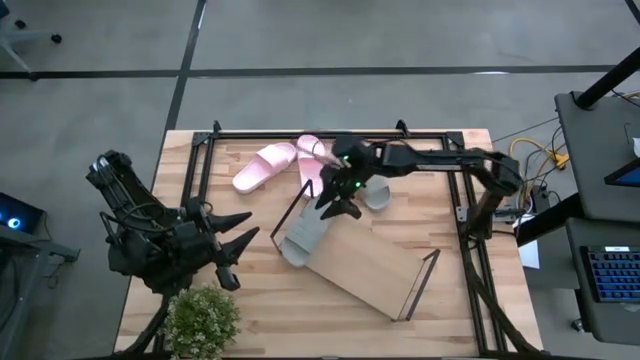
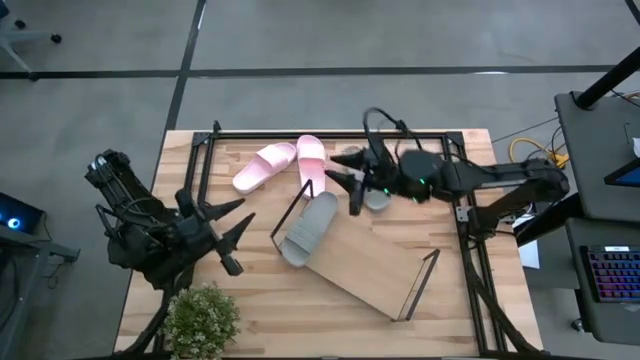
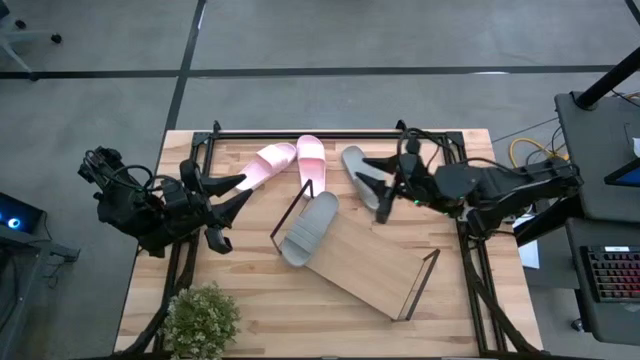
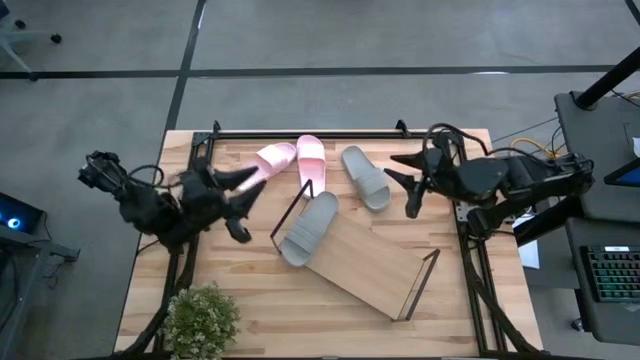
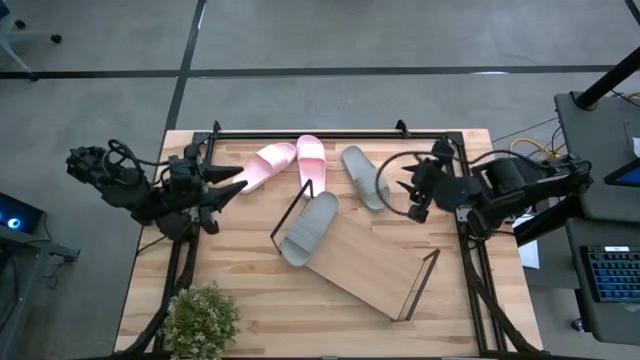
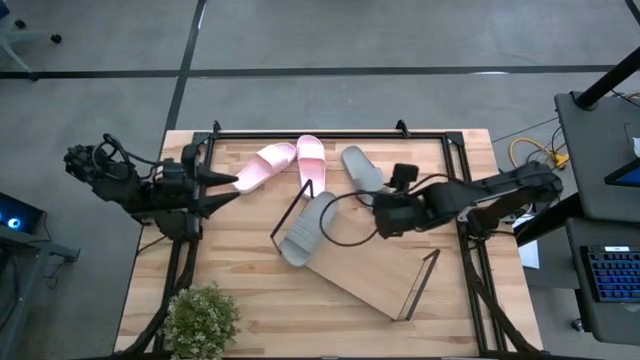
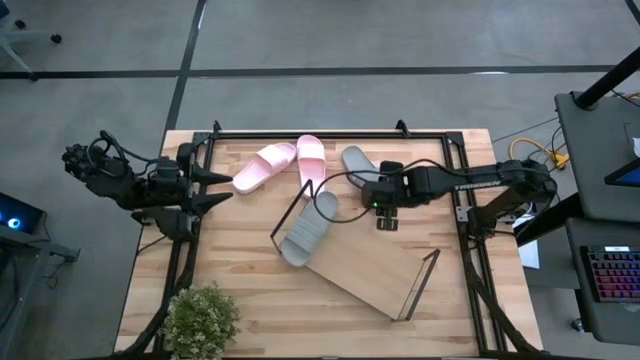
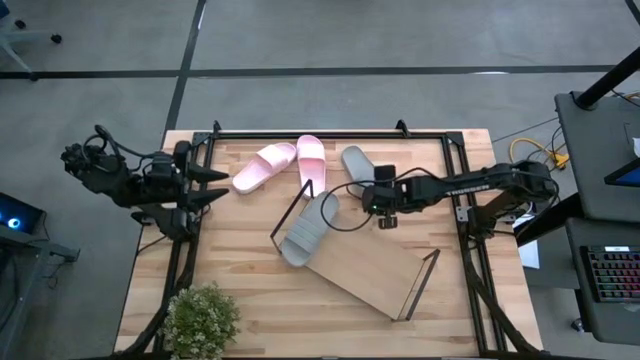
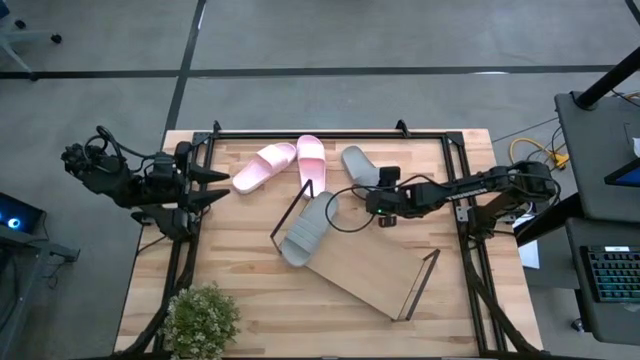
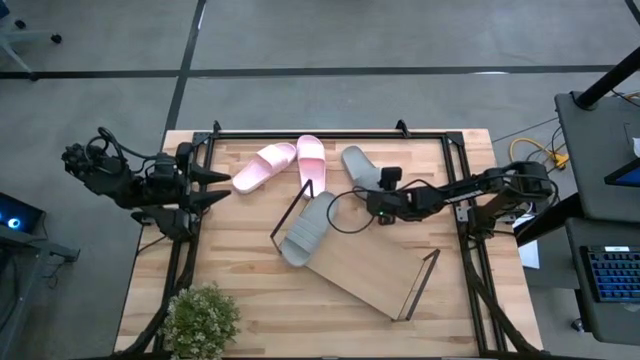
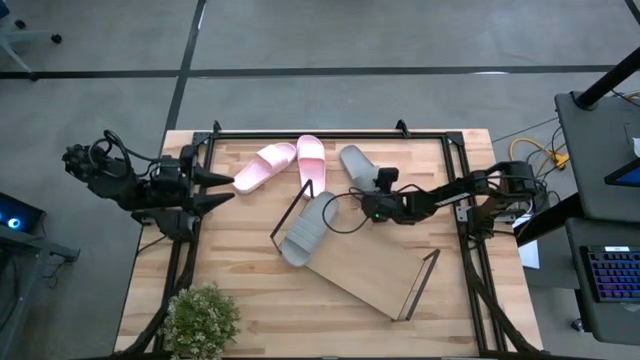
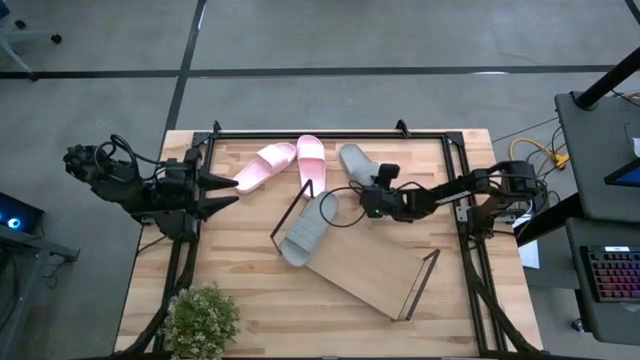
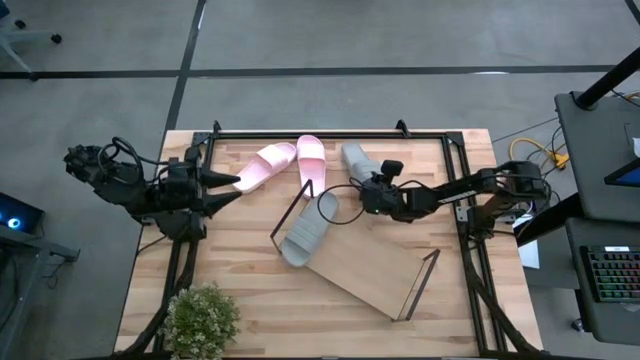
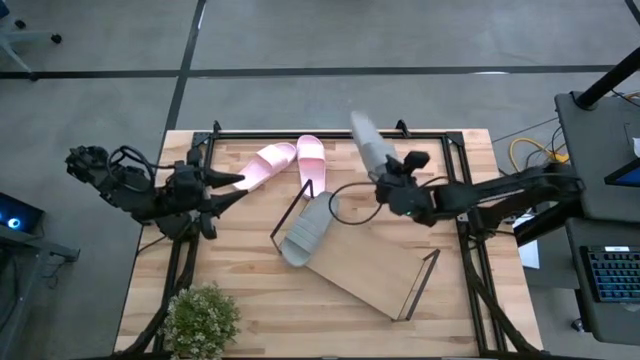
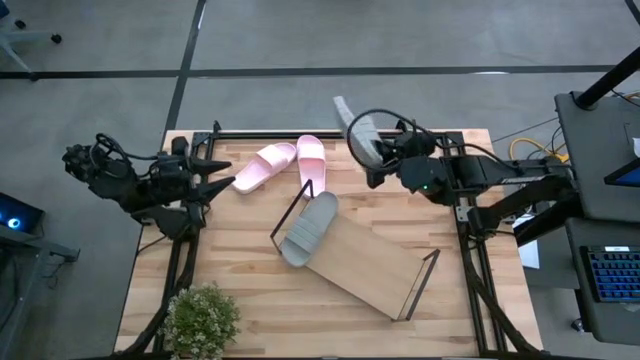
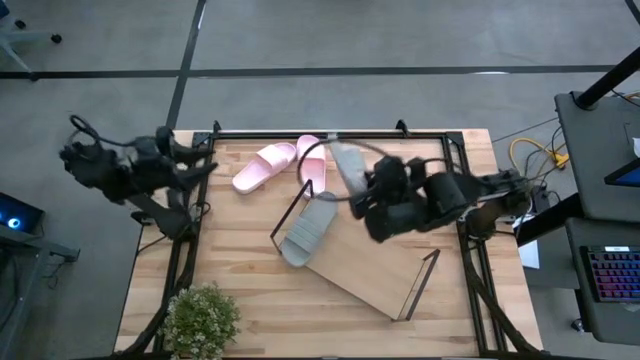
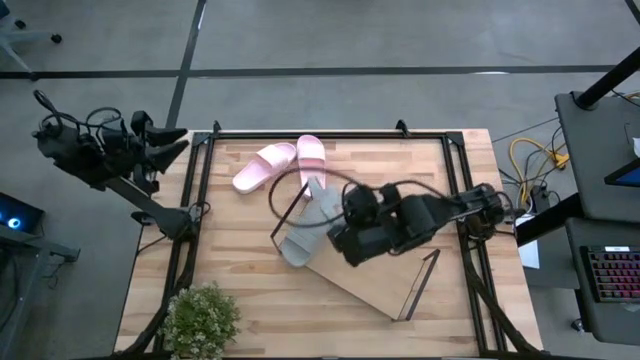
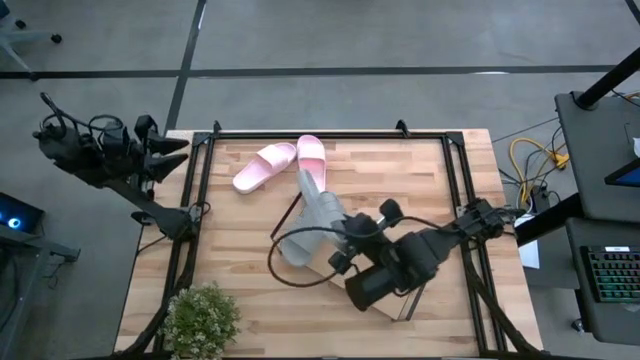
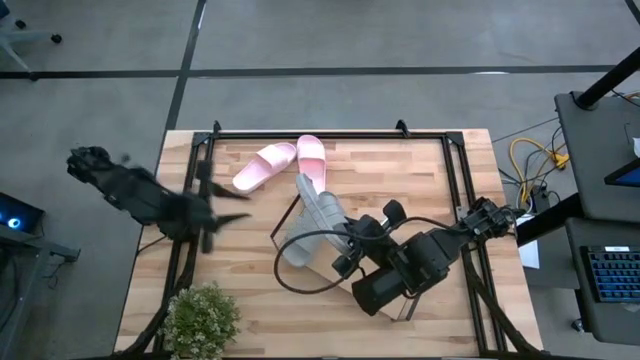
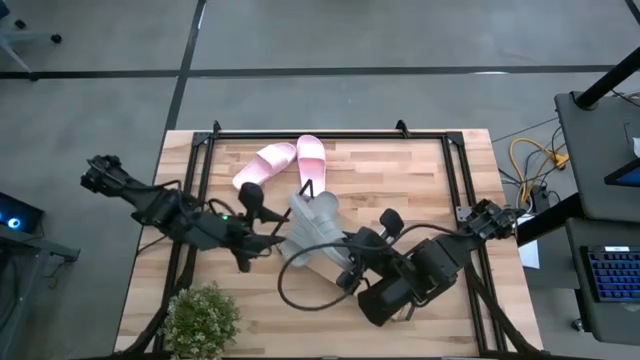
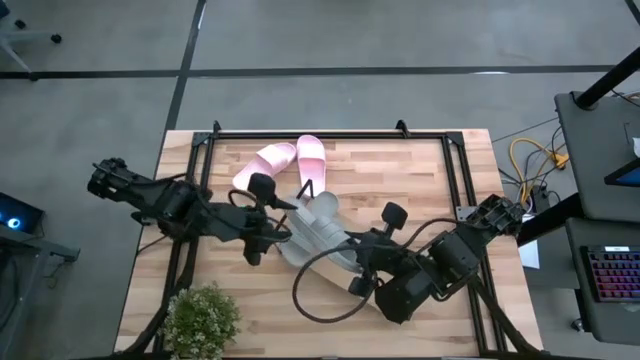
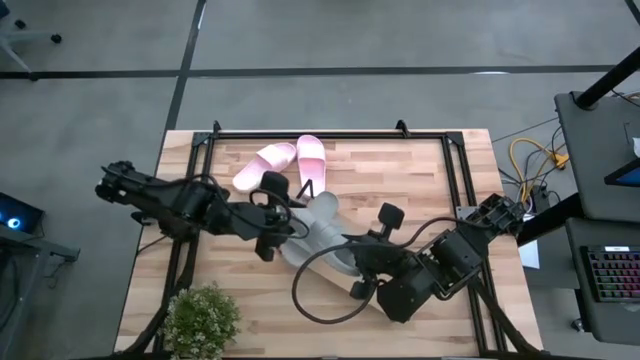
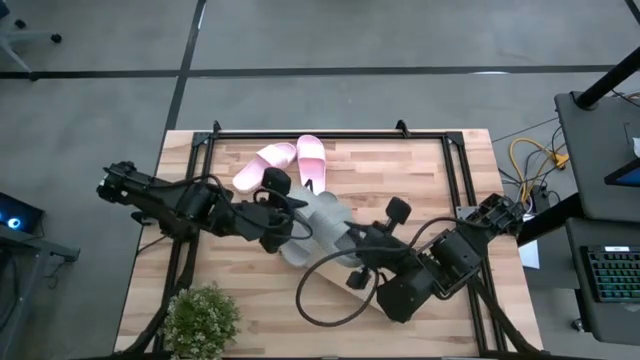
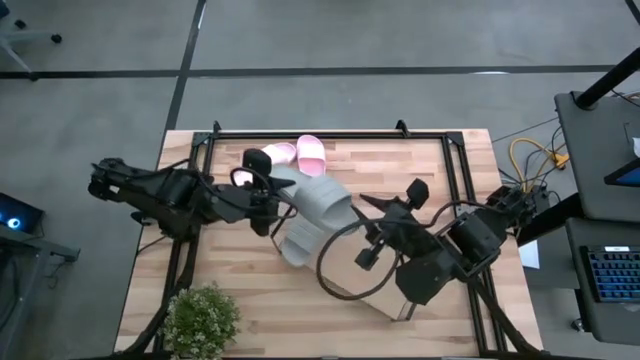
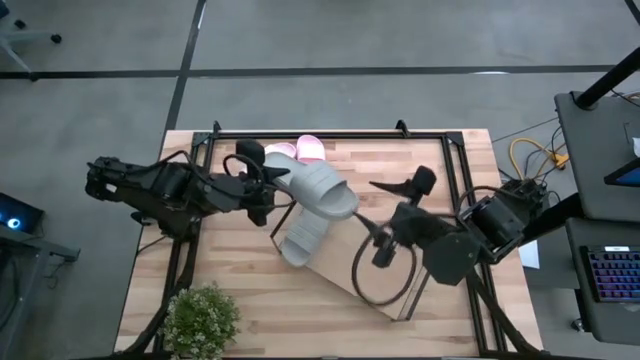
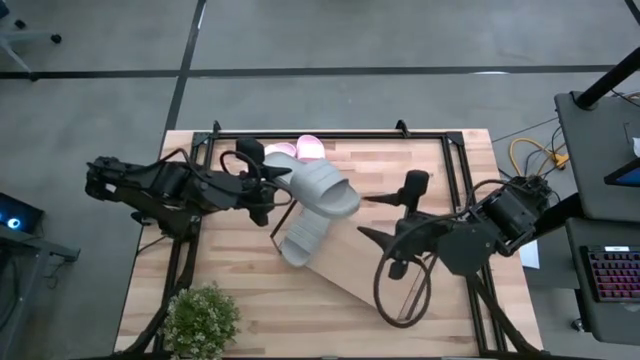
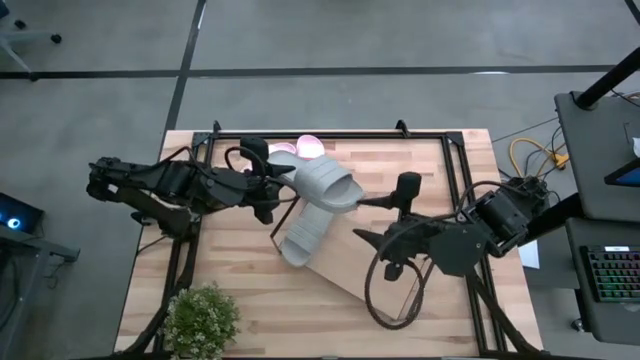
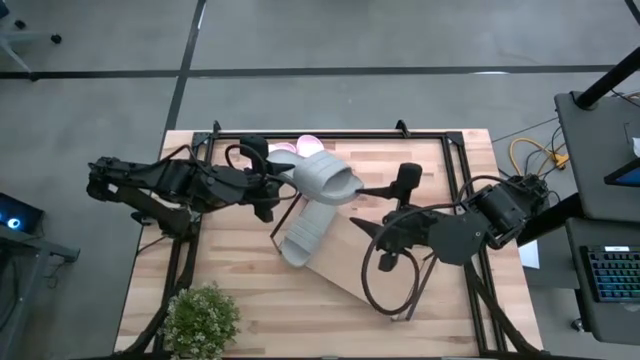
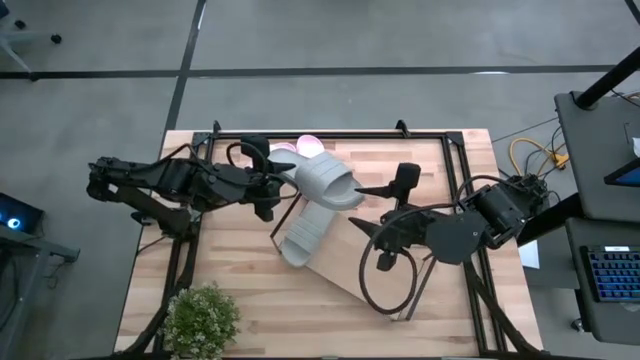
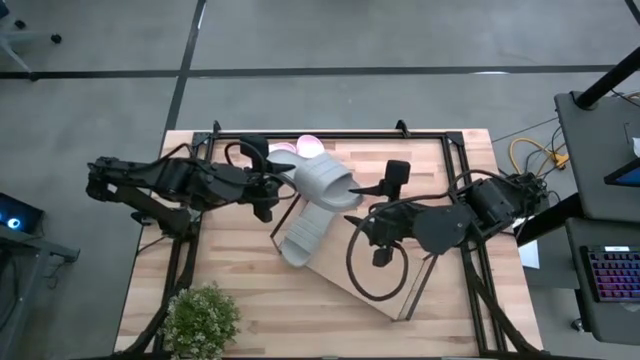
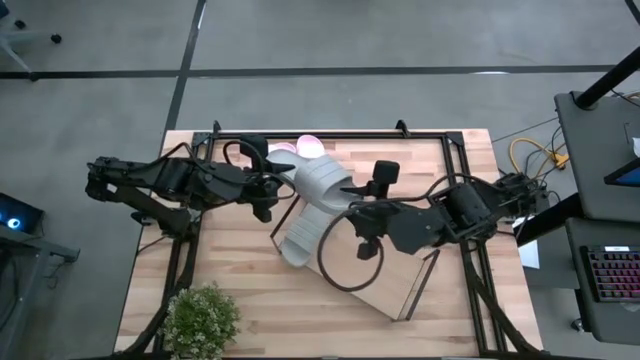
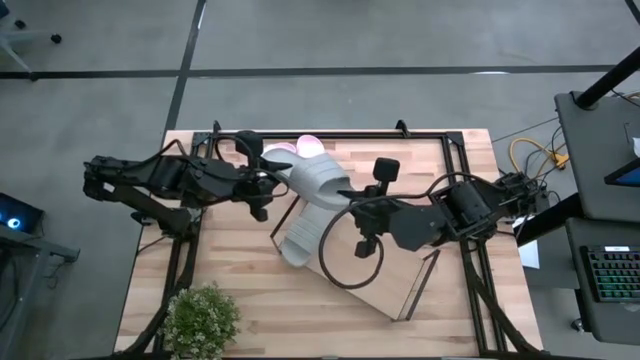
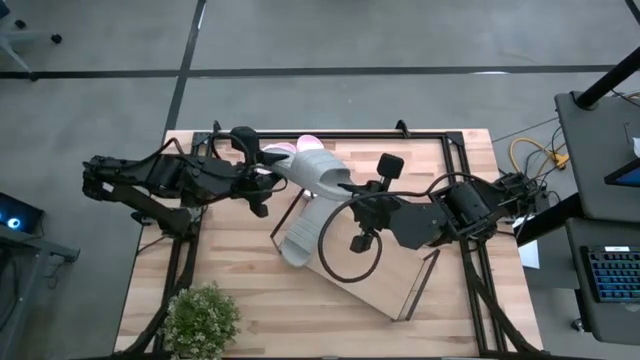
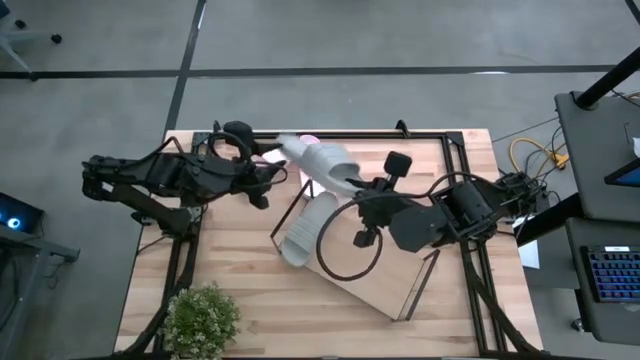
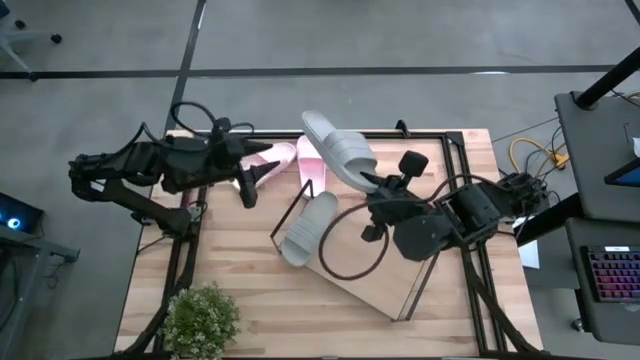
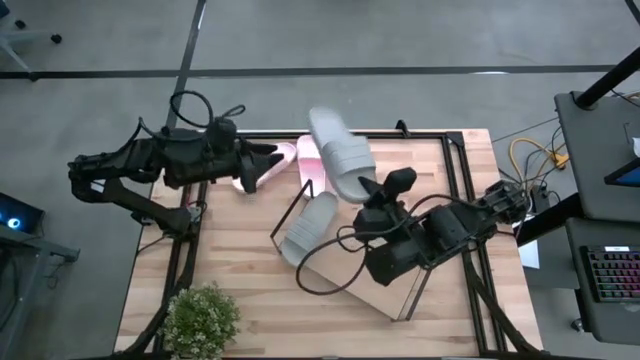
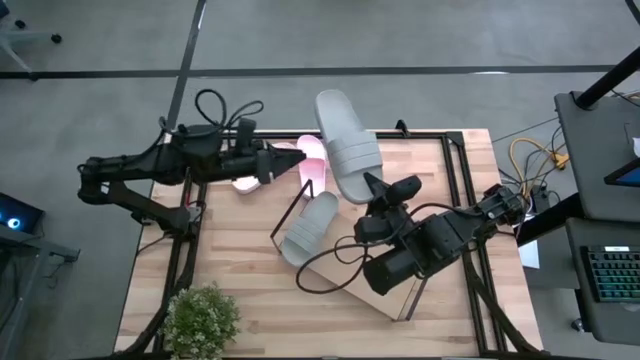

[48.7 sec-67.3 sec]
Task: Pick and place slides into the shelf
Put the gray slipper on the shelf
